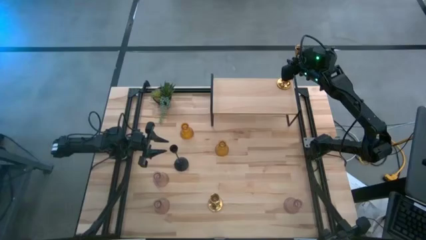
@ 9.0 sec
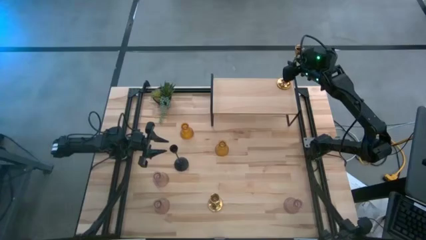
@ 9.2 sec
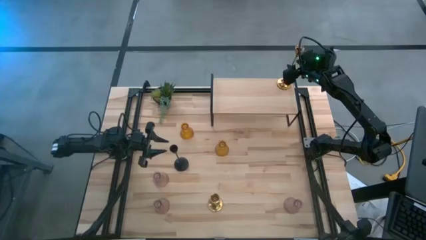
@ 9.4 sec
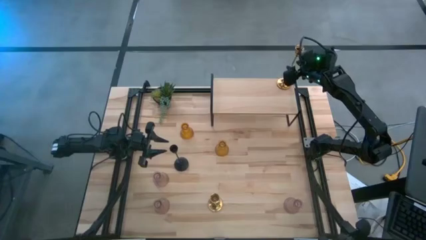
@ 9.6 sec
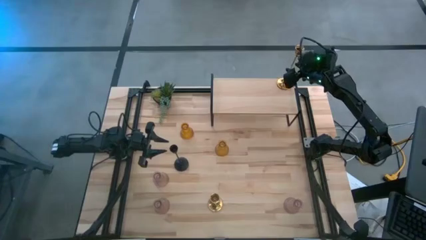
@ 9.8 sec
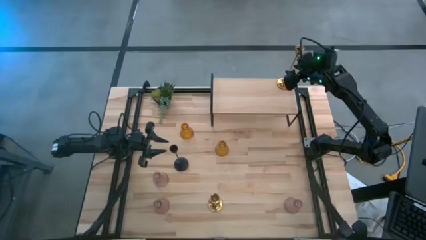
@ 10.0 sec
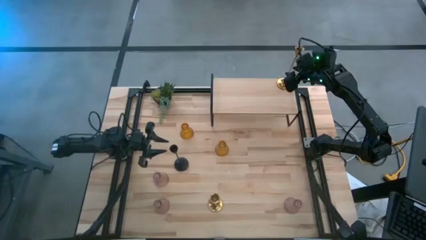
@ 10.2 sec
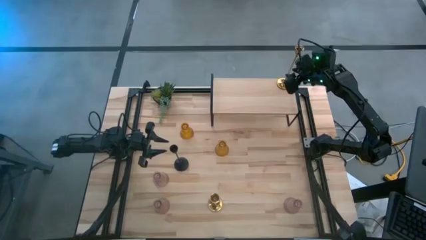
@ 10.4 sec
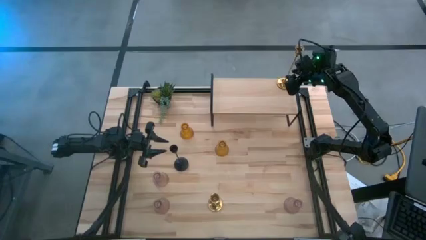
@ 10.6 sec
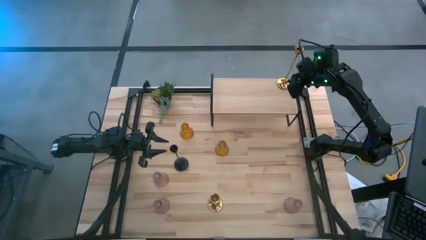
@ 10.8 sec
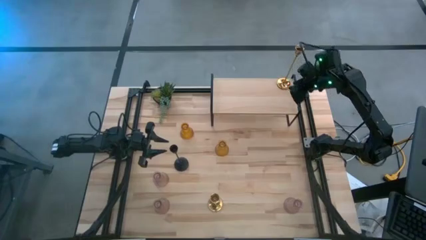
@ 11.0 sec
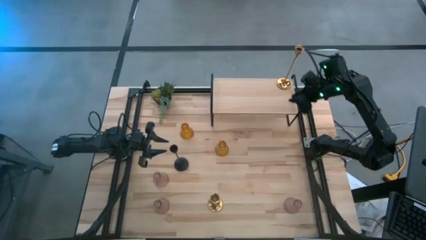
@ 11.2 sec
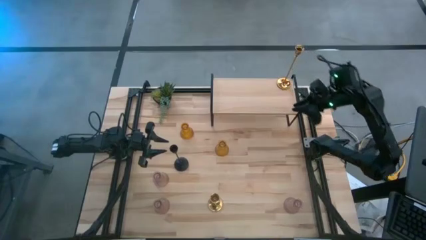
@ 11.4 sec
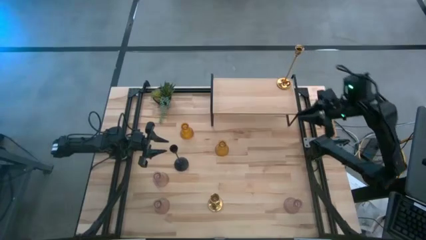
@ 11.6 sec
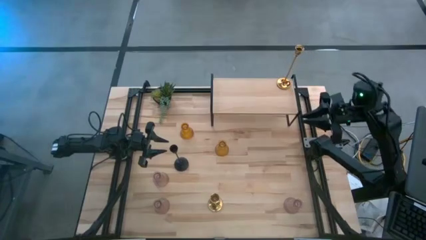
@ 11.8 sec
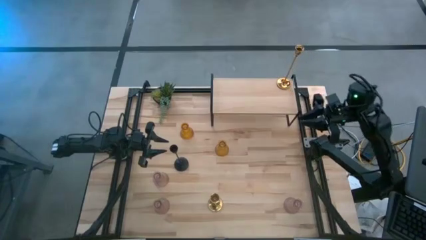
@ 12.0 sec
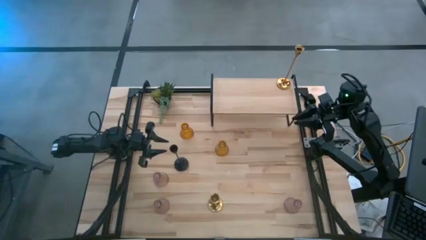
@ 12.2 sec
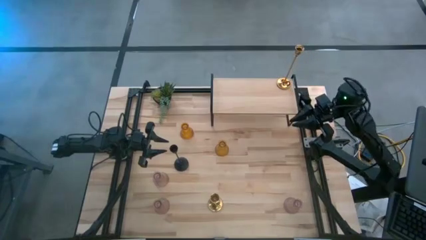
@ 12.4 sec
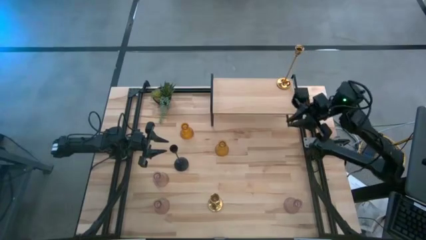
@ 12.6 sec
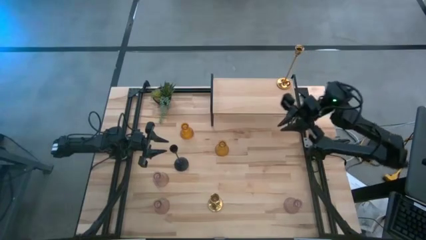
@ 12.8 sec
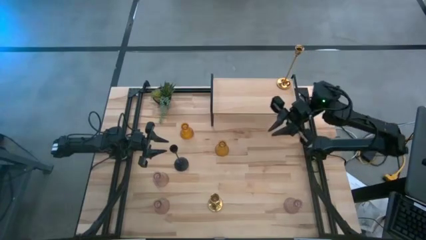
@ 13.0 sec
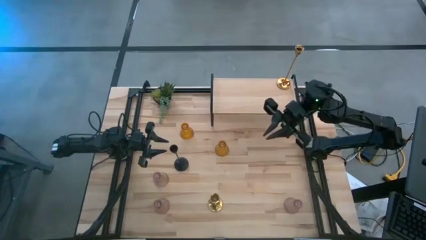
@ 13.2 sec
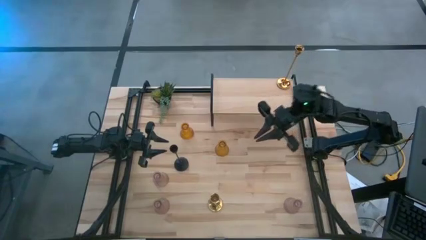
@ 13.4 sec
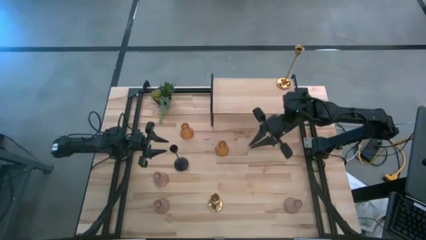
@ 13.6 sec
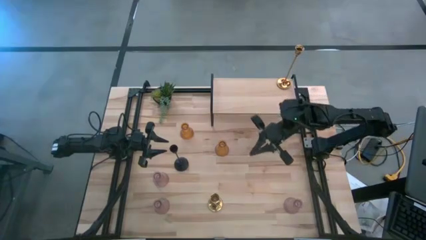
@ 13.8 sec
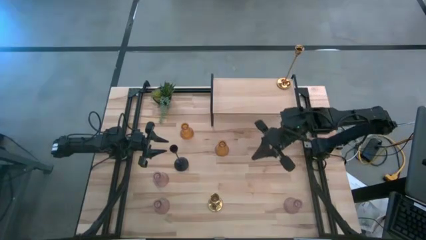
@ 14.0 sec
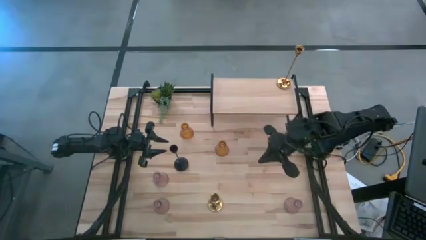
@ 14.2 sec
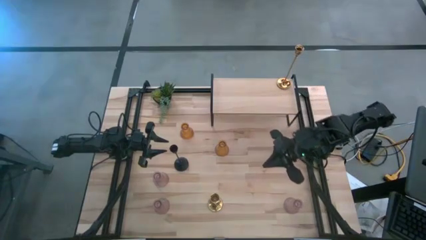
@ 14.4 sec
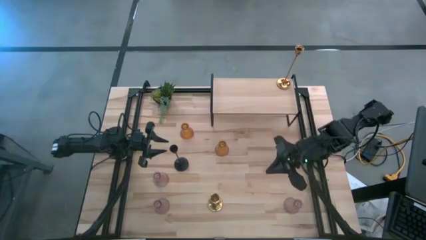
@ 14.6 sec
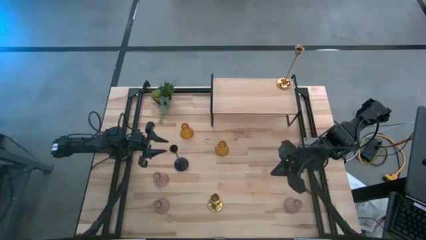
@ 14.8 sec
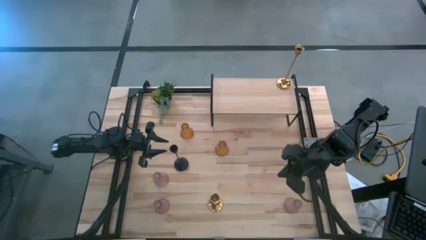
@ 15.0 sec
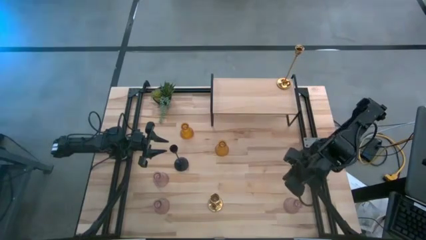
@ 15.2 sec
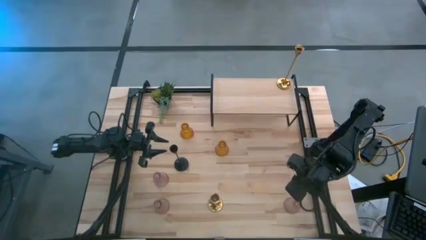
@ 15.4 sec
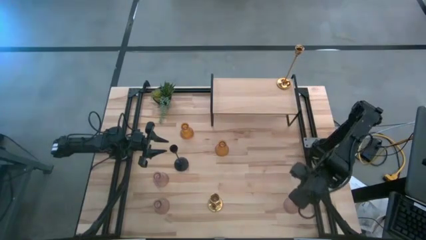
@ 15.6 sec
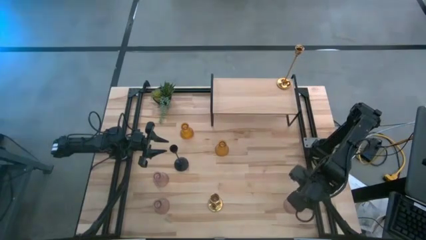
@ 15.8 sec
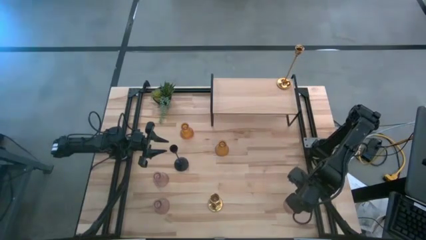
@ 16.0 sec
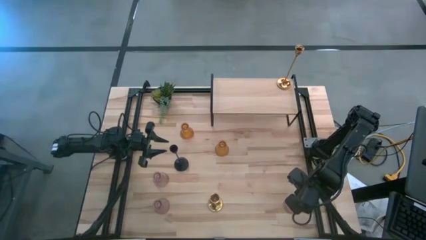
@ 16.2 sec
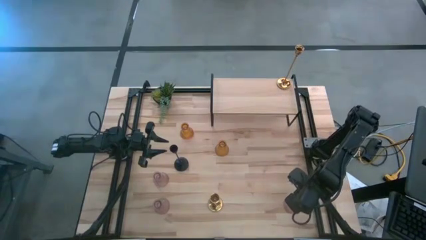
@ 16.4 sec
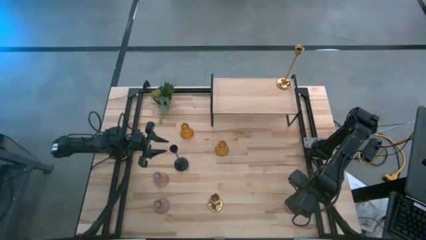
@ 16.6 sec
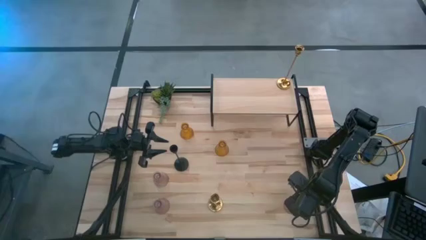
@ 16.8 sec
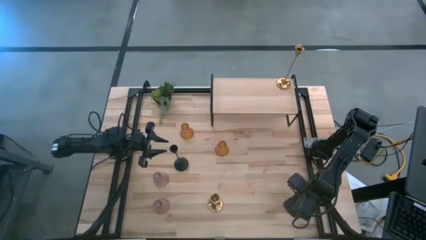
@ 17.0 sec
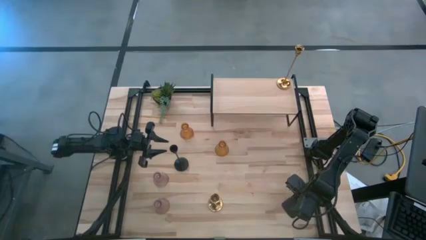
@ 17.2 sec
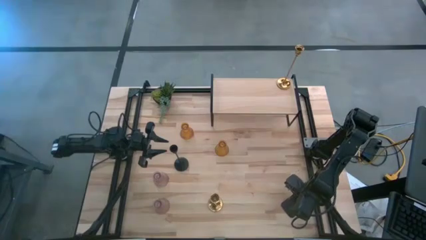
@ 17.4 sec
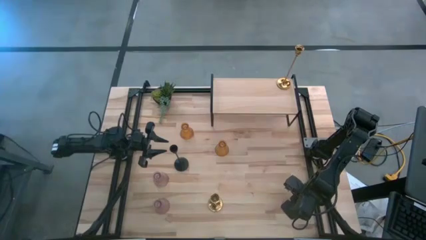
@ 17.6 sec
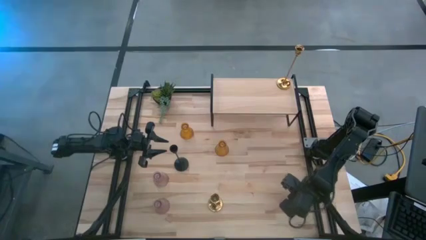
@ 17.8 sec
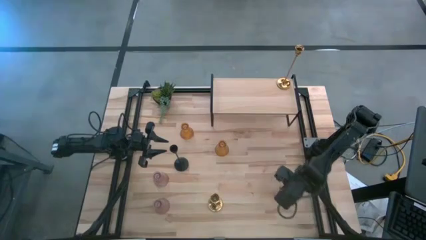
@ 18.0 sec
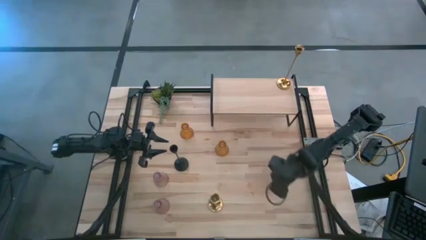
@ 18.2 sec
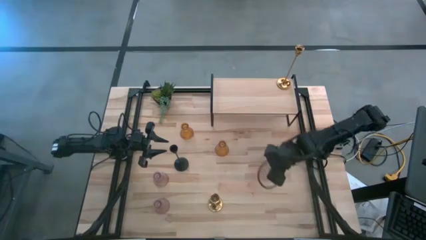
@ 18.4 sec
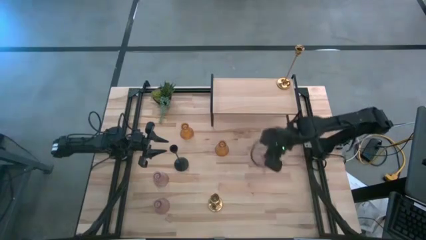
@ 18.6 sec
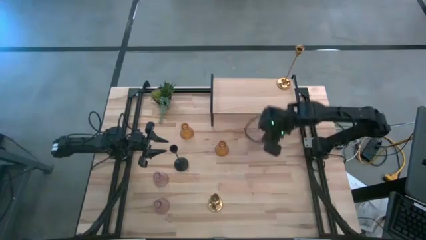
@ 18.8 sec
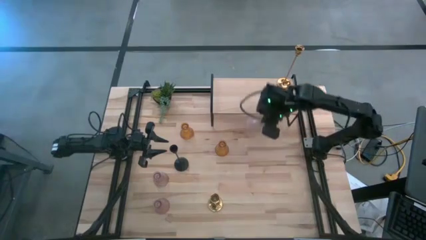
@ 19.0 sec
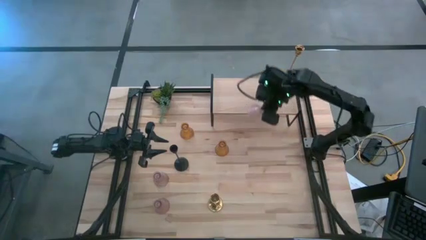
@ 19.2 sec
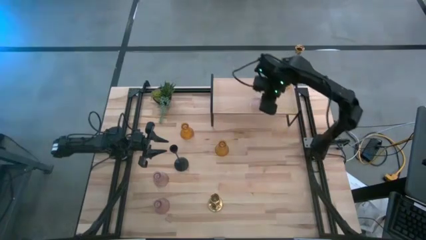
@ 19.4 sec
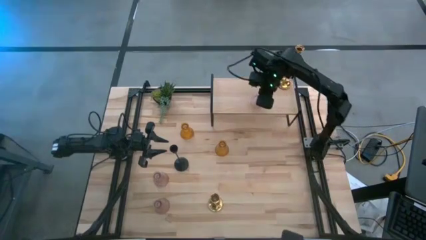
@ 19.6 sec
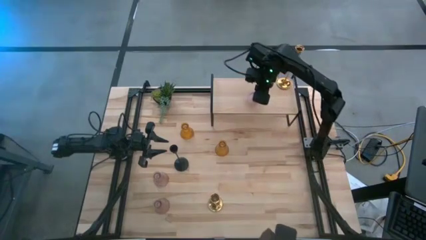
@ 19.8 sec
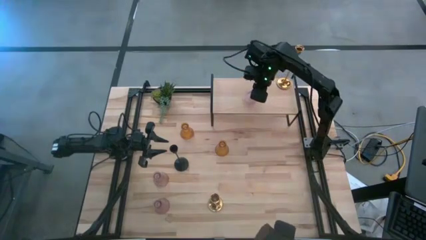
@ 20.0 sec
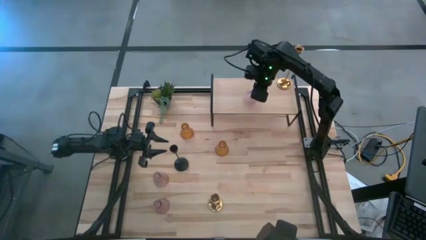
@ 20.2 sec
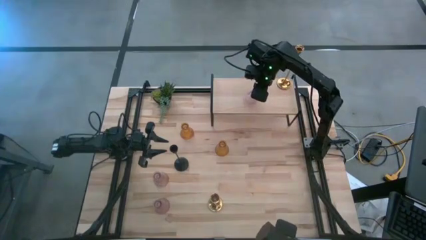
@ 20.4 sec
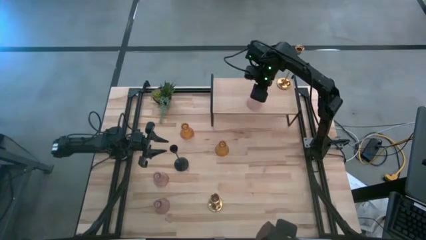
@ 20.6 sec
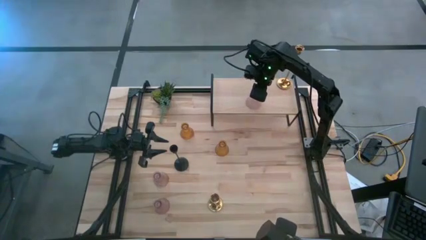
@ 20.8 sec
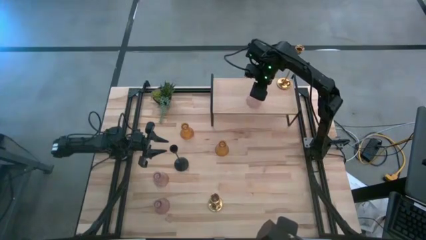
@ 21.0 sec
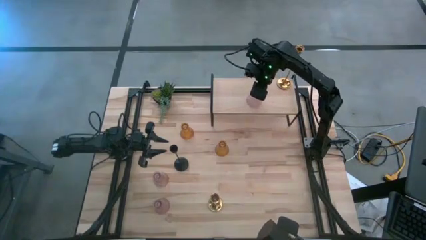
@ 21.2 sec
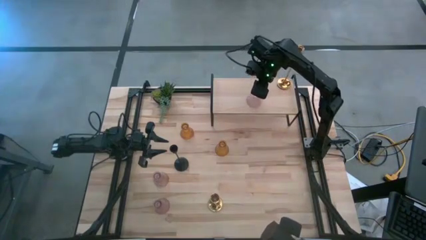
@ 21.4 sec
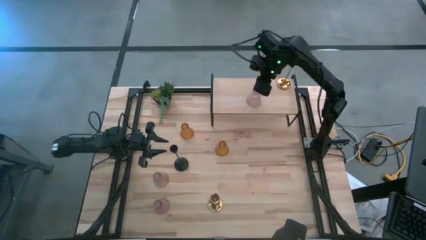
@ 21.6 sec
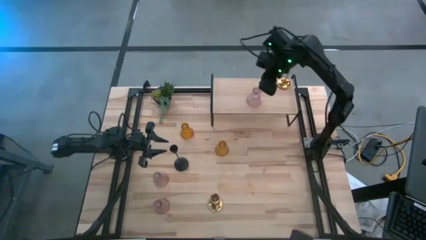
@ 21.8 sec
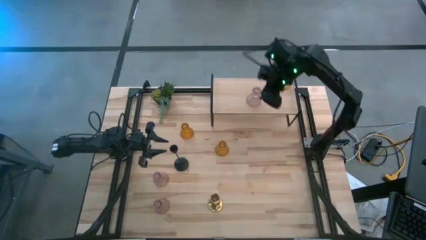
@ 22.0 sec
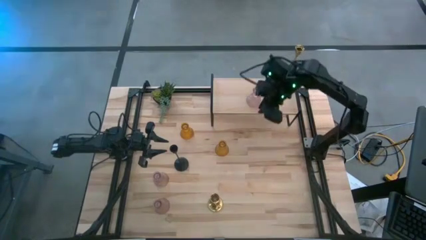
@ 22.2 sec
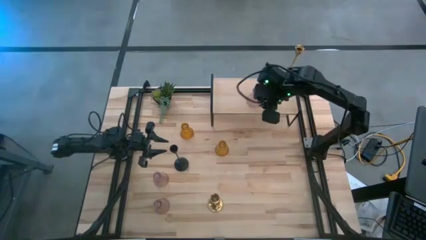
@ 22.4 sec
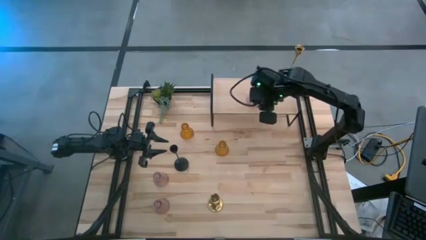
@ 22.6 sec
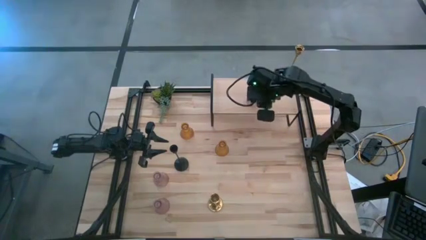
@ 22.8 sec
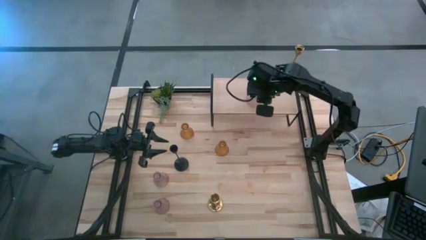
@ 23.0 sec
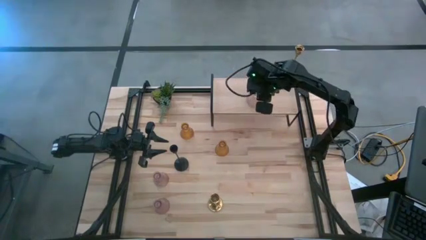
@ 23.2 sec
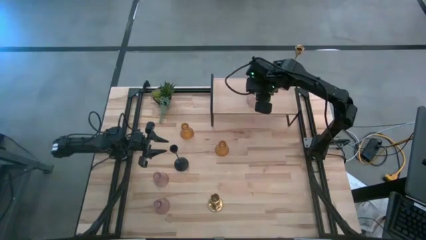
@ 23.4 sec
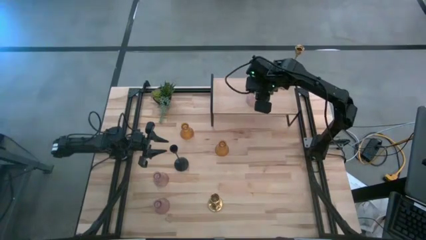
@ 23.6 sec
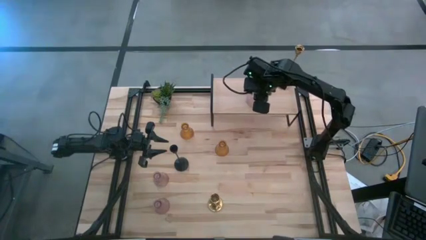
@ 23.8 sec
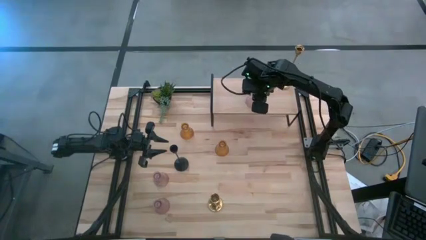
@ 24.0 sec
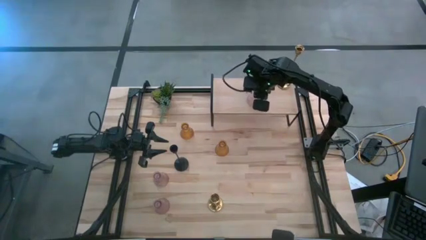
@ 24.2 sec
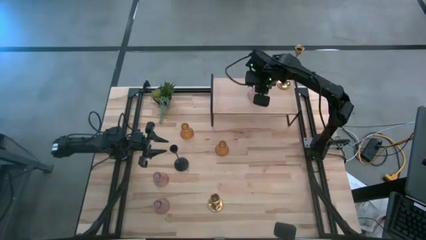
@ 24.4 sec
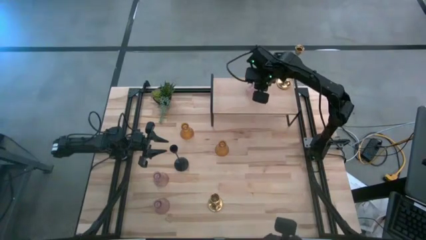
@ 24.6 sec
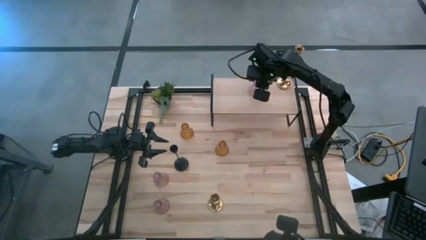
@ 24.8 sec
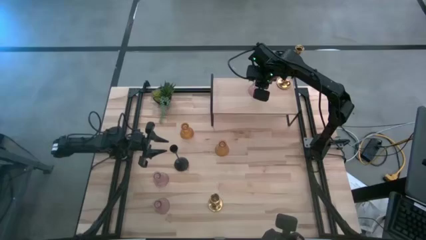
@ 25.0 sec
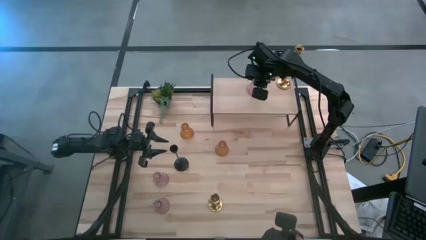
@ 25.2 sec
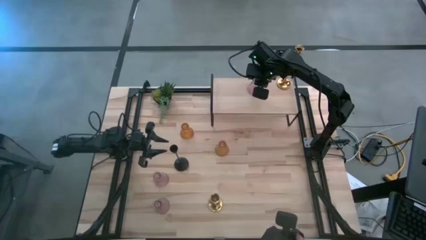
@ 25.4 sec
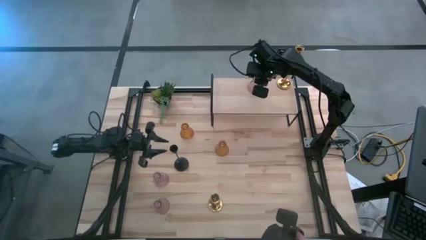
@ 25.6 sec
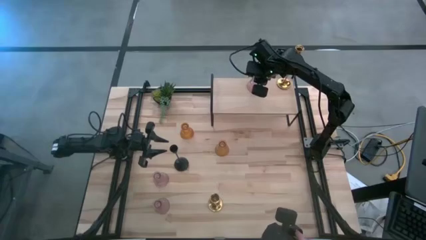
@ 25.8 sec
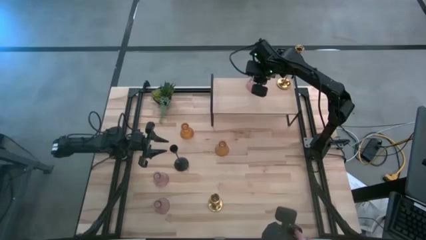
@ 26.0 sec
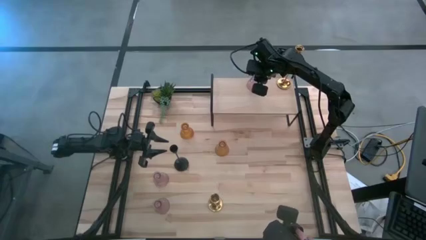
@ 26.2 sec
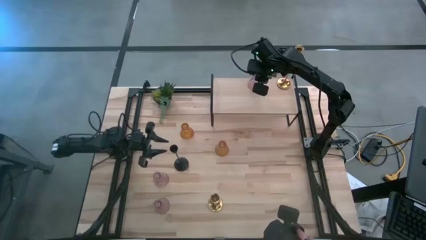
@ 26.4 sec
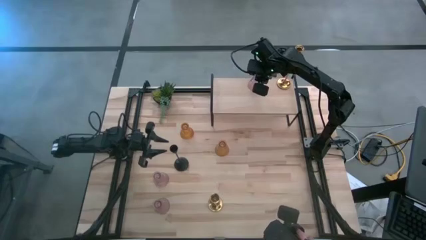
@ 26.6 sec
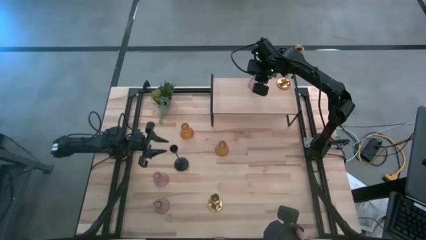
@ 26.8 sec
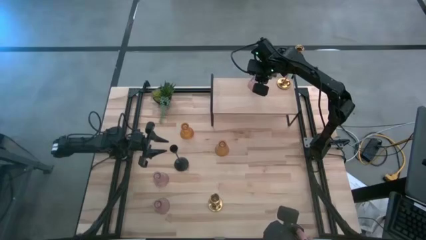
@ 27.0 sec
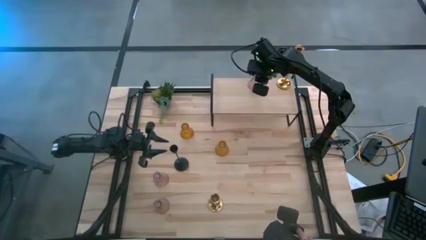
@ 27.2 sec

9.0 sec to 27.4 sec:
Task: Pick & Place candle stick holders
Put the bottom right pink candle holder on the shelf
